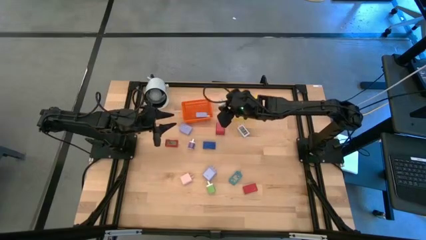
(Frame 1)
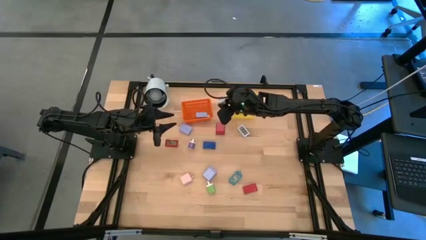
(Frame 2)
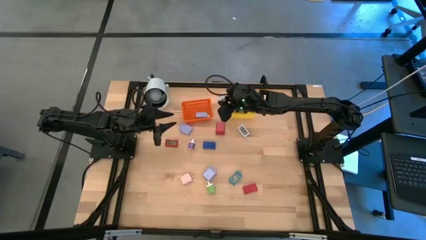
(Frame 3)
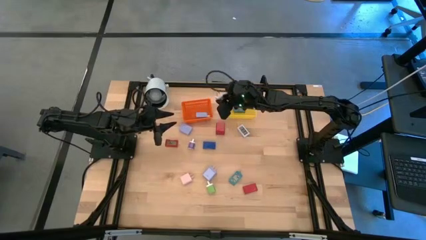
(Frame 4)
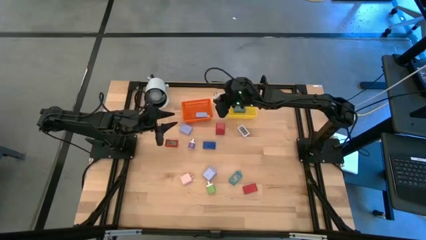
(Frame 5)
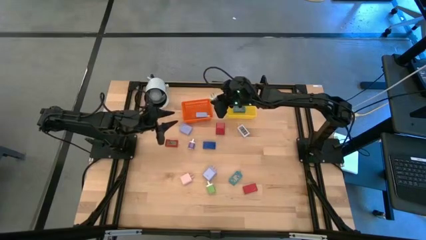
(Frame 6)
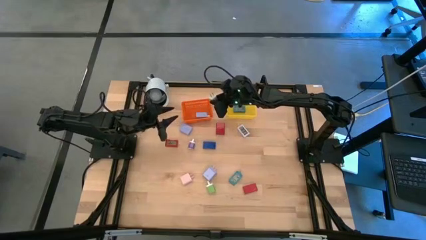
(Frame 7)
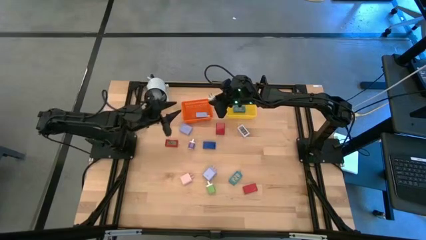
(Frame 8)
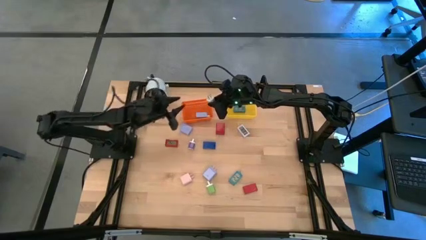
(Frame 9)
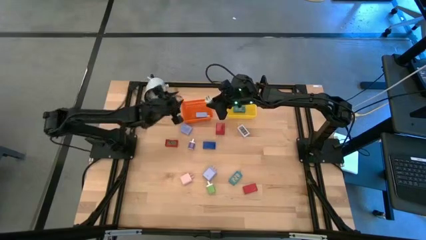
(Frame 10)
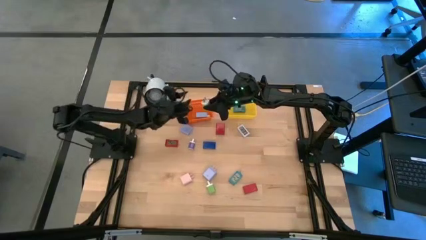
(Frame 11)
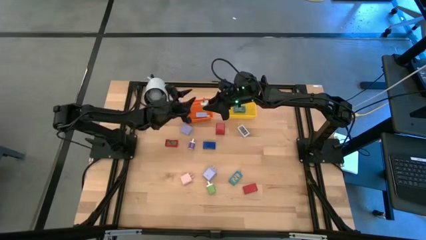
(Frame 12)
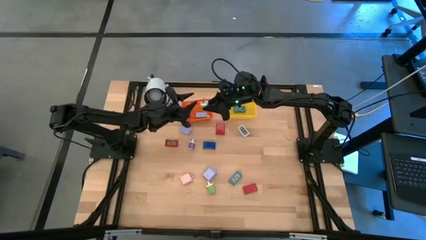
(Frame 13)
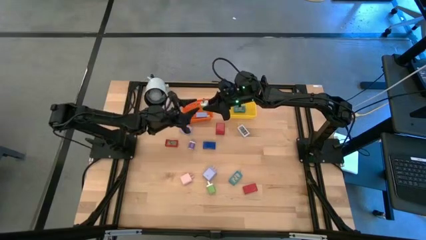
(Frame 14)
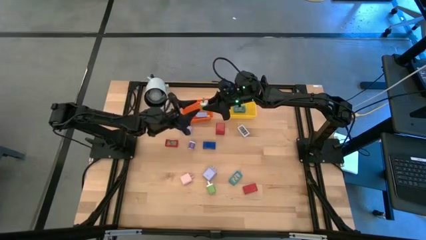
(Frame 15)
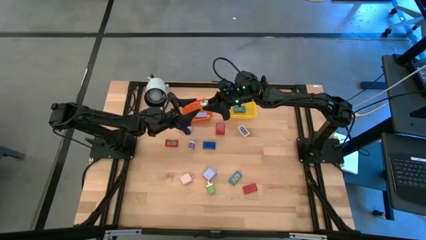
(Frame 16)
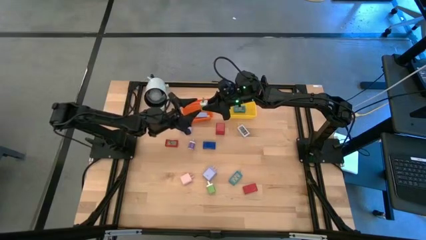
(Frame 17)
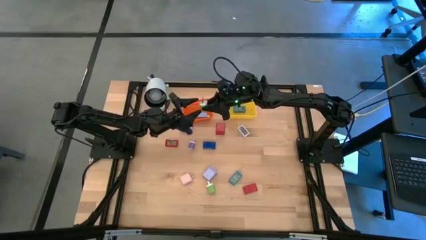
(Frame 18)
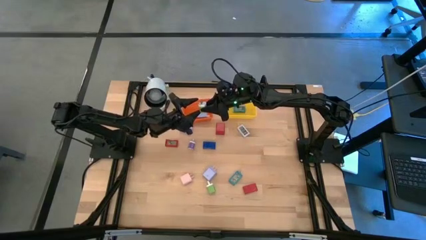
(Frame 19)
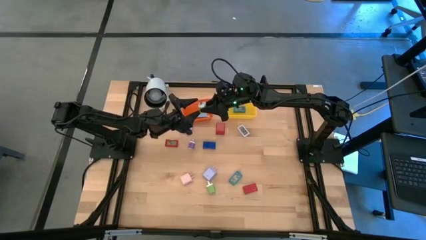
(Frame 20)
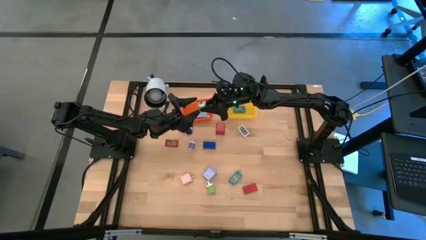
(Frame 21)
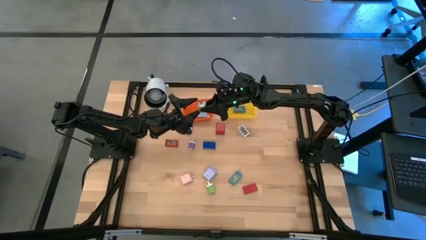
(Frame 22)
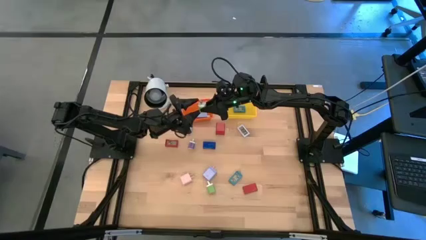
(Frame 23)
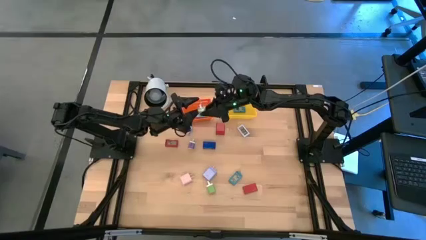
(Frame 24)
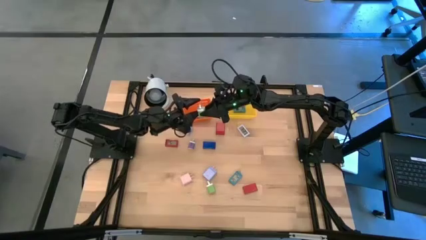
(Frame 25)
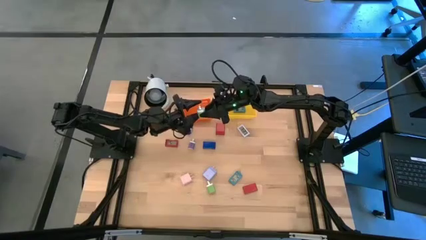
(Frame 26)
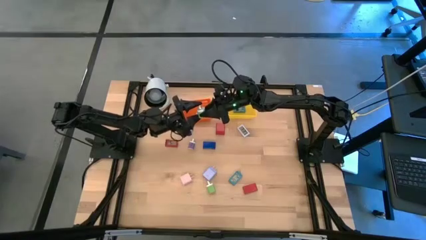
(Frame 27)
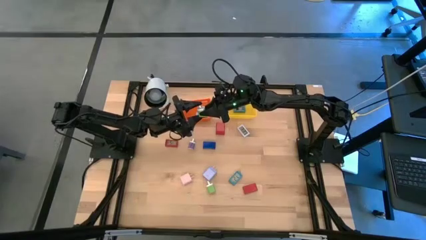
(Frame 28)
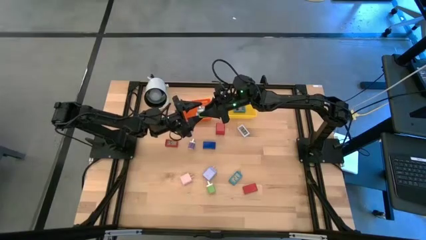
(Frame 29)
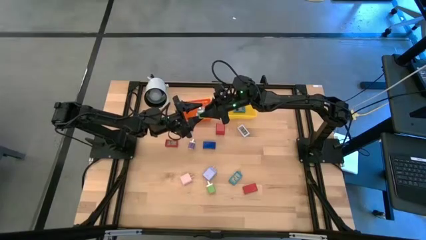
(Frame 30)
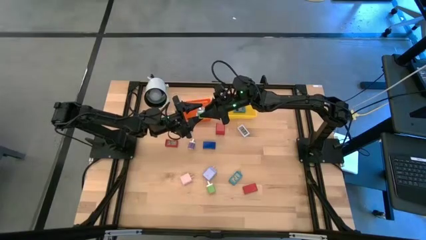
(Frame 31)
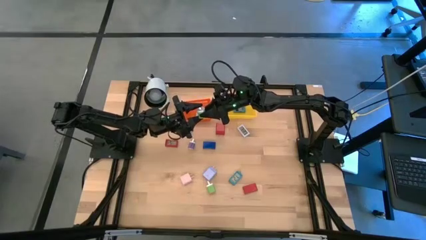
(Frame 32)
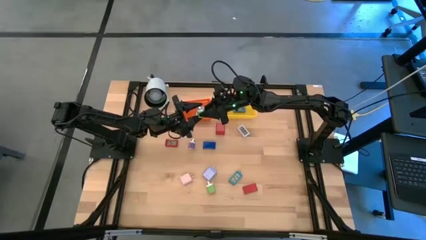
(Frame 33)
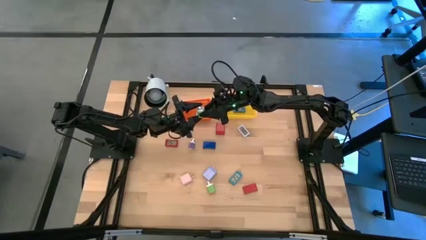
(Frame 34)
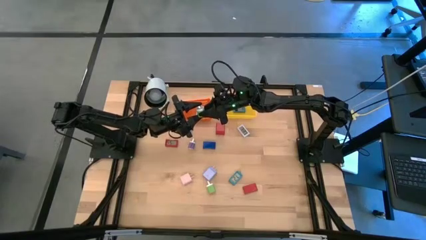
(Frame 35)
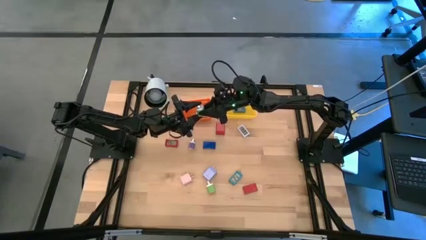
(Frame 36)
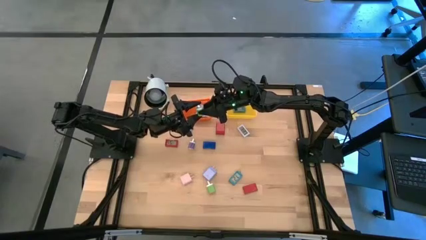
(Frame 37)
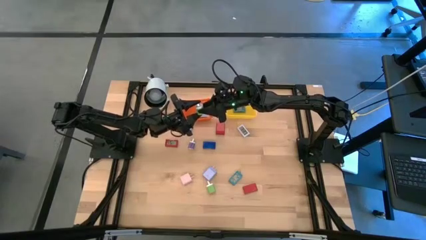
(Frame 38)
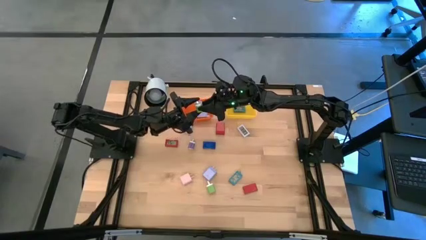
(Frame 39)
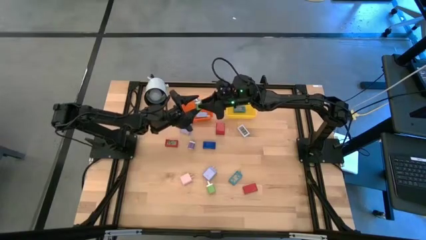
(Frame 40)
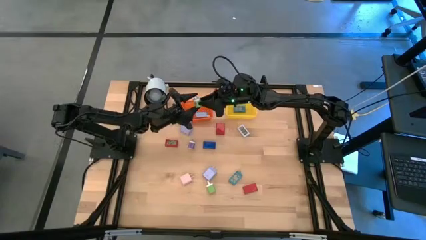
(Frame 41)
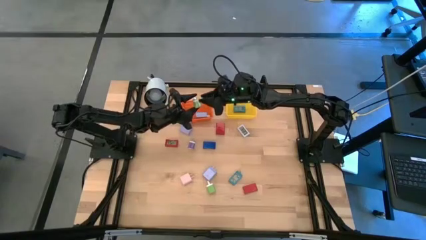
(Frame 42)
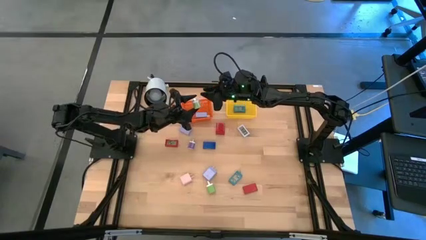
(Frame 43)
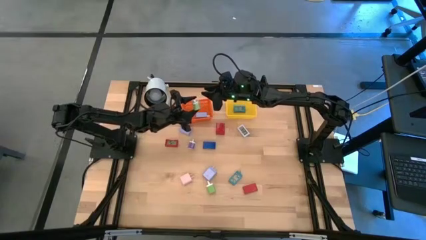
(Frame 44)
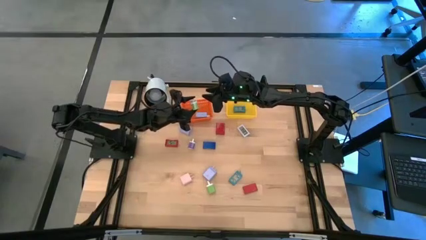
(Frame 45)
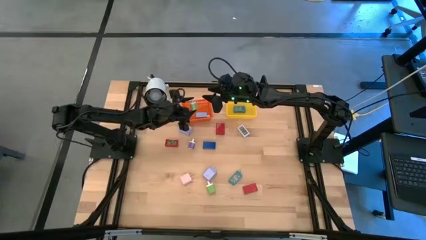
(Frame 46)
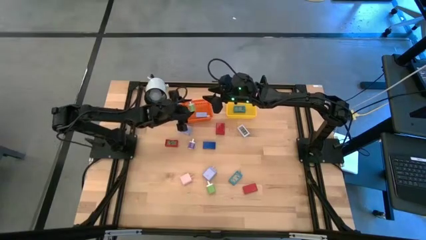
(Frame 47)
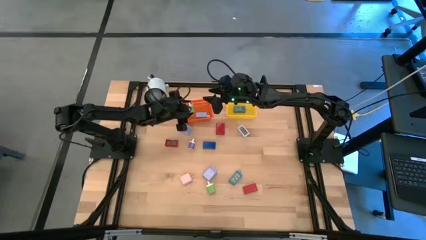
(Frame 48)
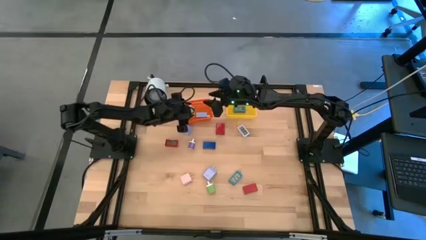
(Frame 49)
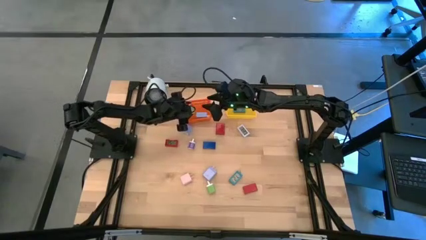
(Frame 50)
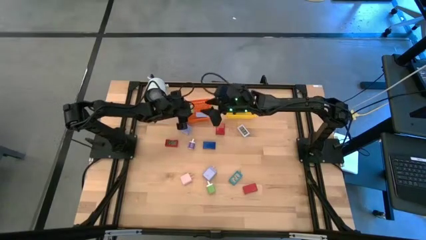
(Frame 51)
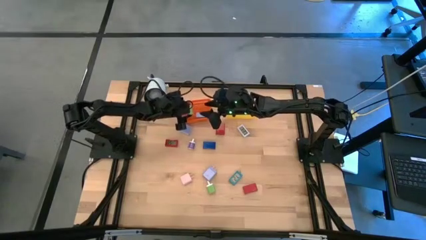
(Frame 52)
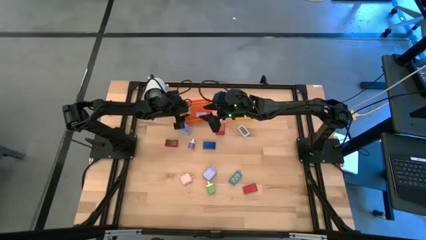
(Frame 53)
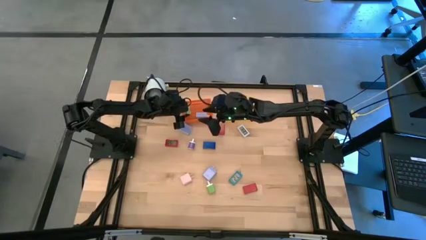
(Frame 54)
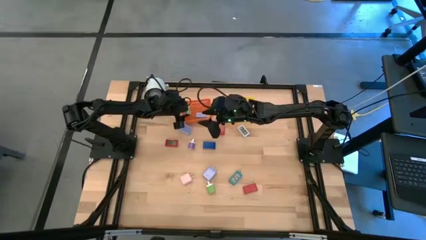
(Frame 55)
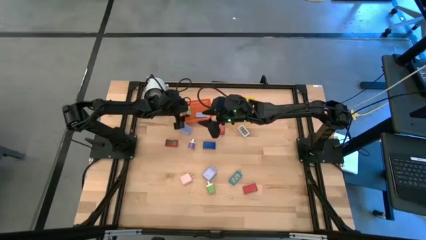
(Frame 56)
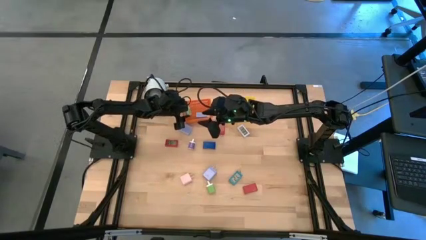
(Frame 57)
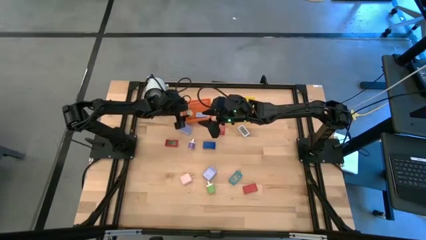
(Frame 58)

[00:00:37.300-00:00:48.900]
Task: Pick & Place Office items
Put the top green charger adapter into the orange bin
